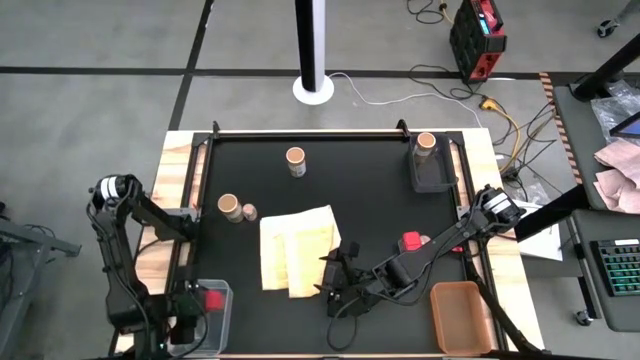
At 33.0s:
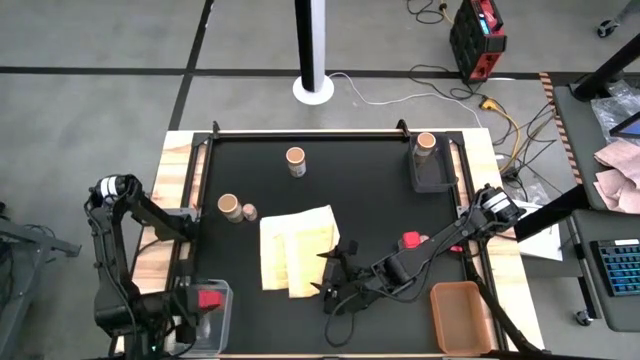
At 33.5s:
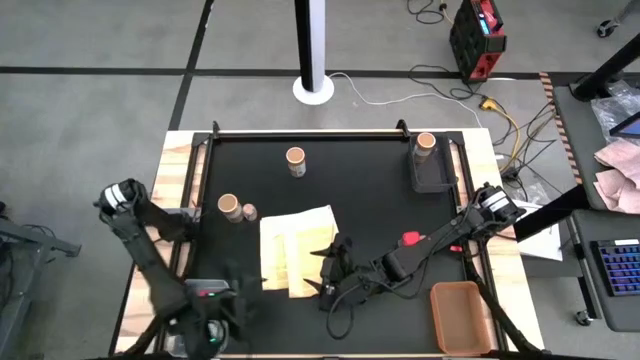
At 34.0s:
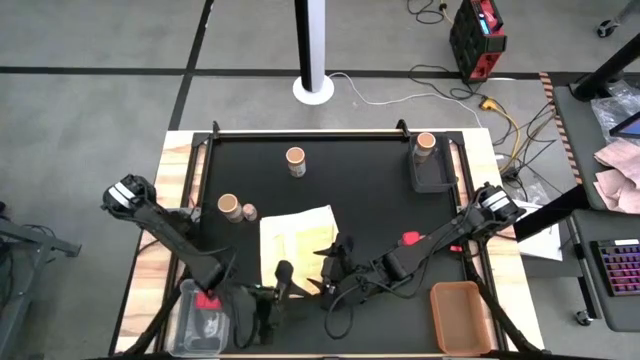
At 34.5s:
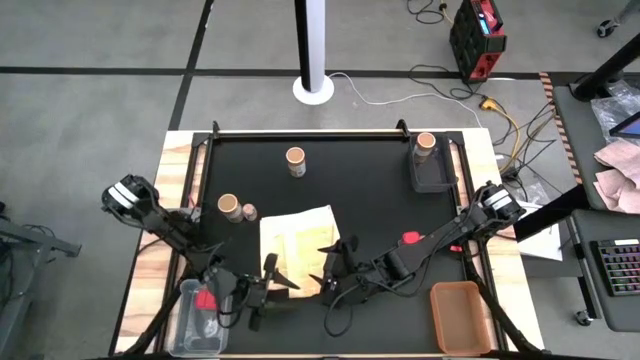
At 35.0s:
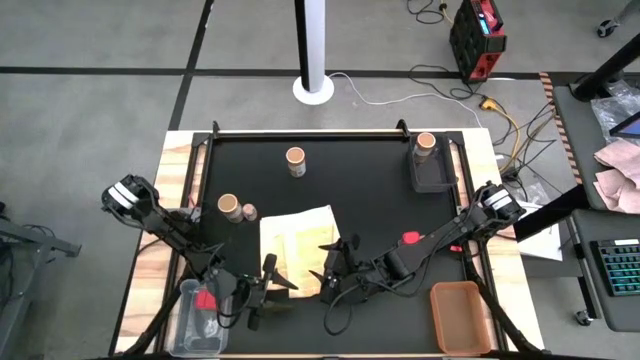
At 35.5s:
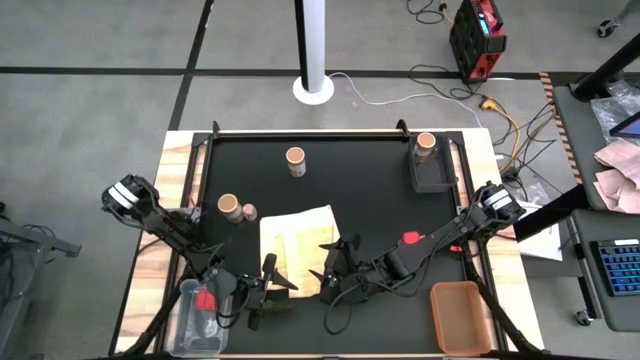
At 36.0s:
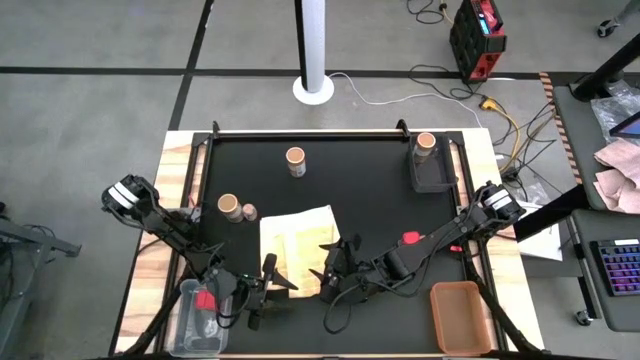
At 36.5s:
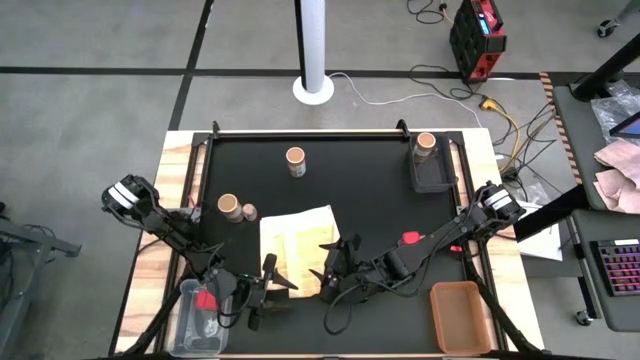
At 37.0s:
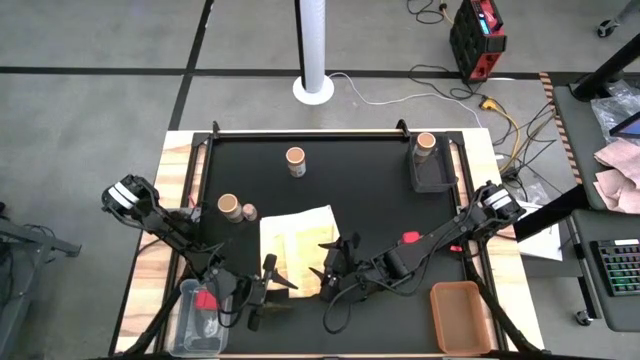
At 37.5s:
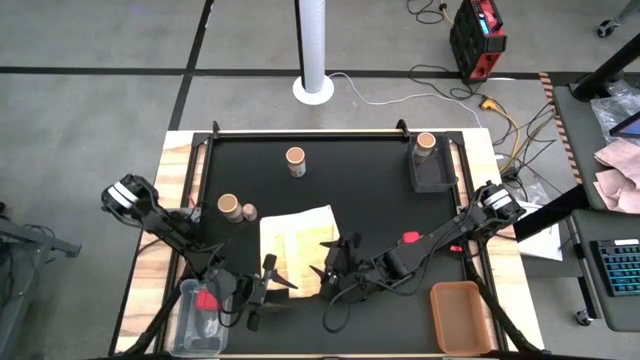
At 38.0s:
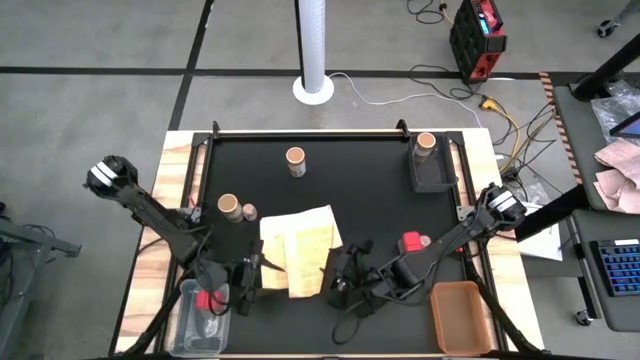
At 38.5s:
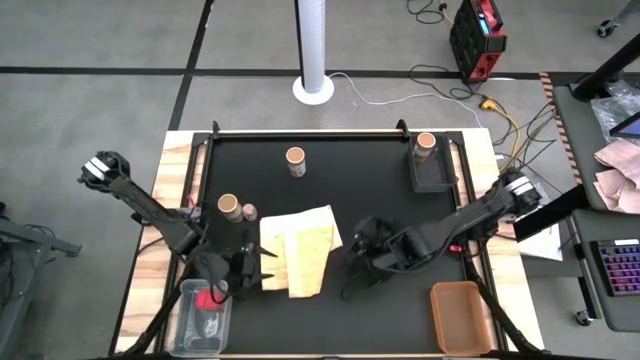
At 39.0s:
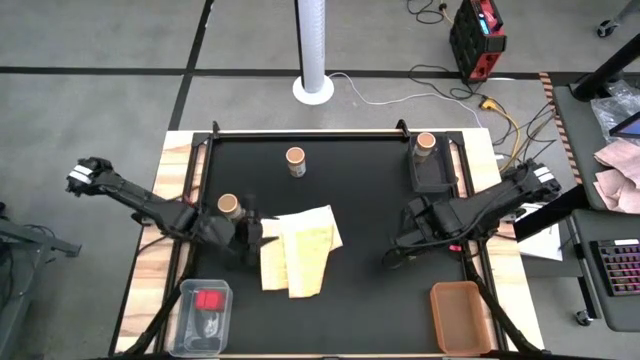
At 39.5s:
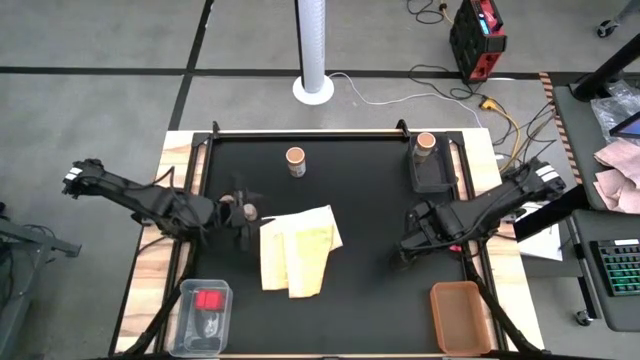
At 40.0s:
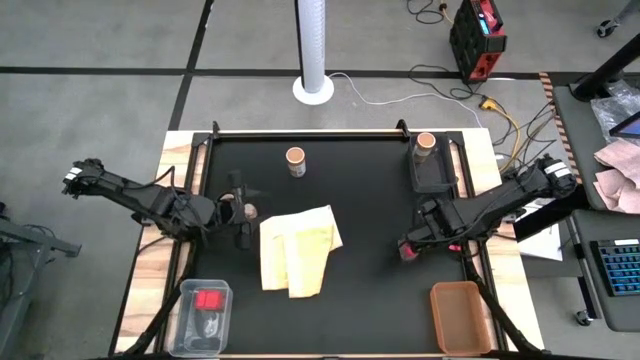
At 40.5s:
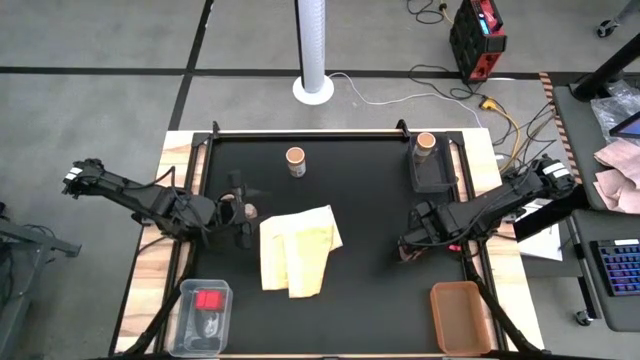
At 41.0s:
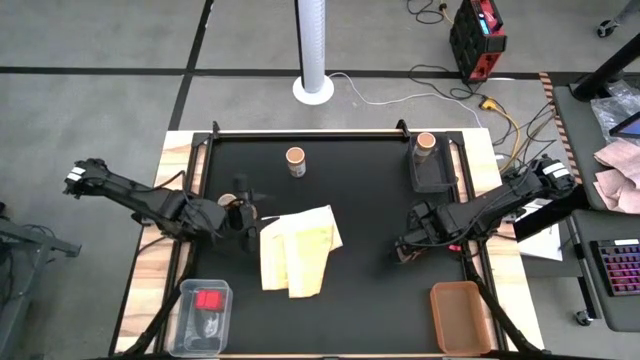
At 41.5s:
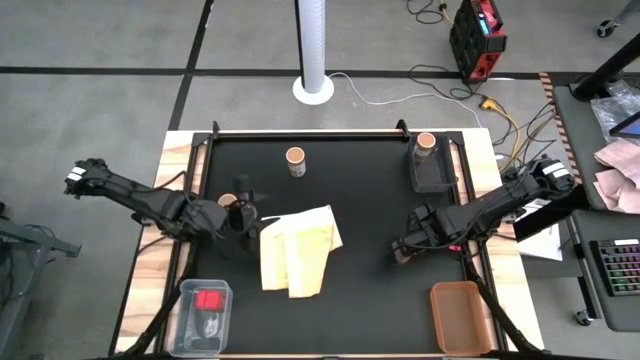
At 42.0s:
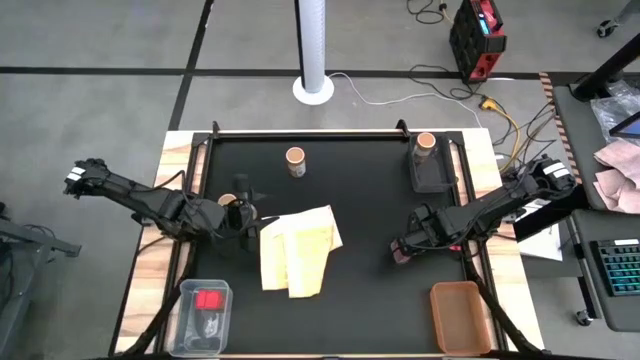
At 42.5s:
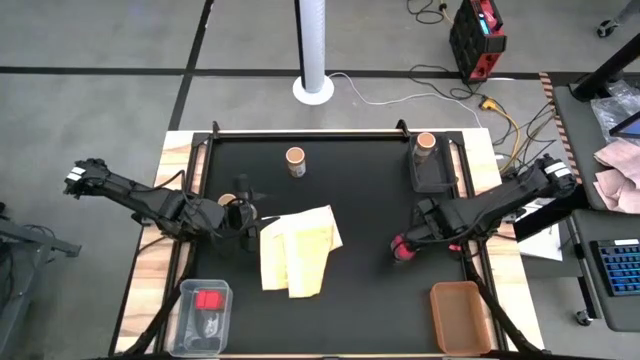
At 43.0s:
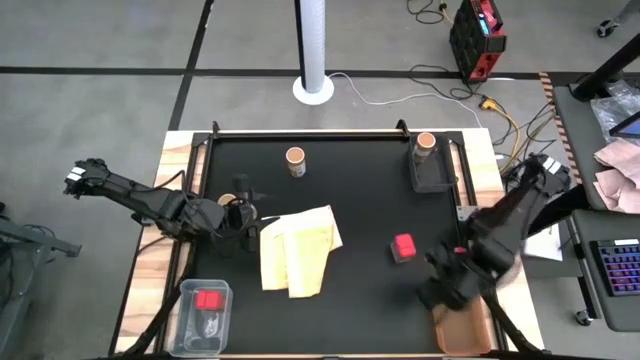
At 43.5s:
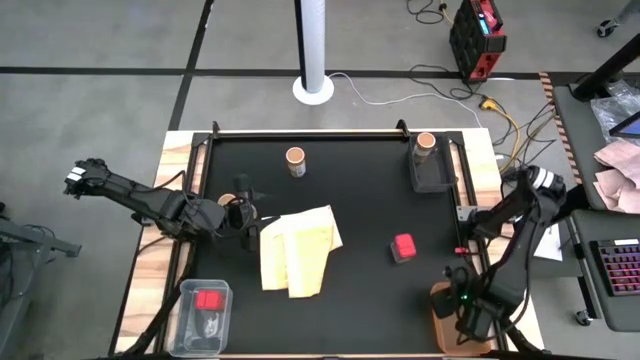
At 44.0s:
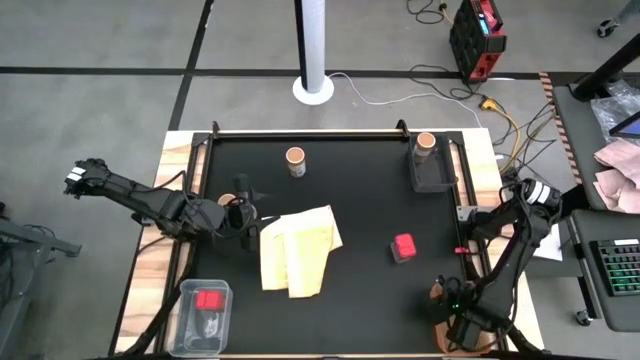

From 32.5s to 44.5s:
Task: Sort spices by type
Put the right brown spice bottle into the orange bin

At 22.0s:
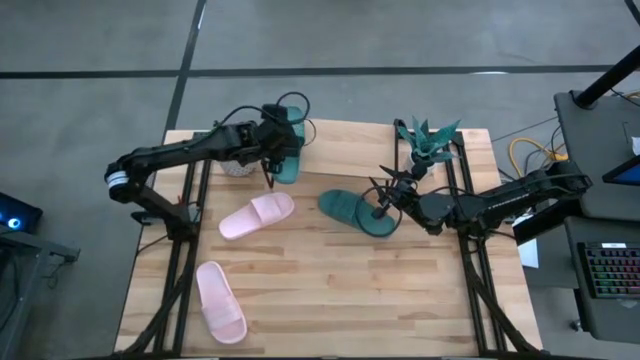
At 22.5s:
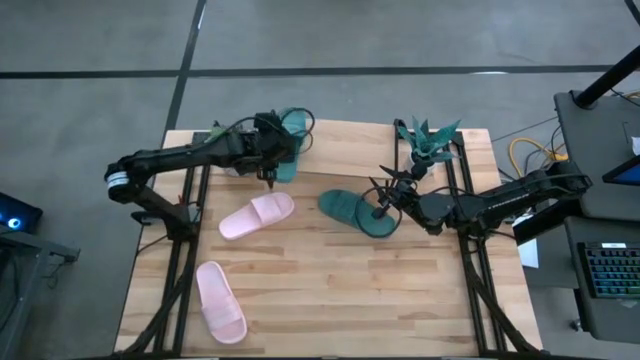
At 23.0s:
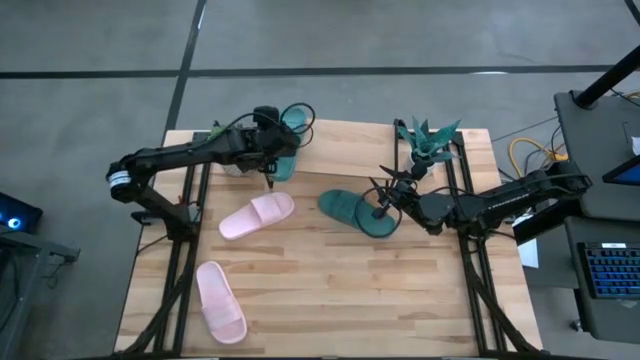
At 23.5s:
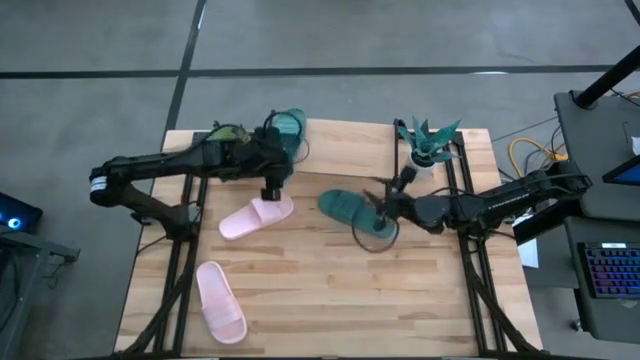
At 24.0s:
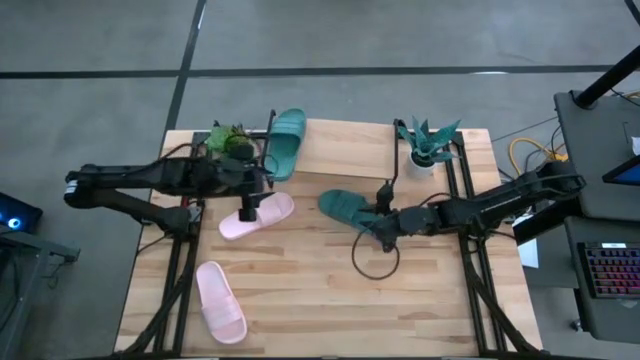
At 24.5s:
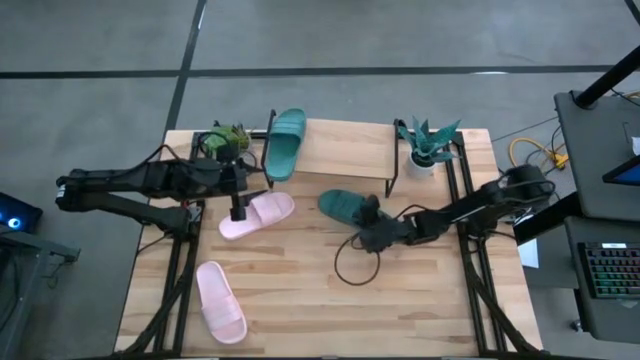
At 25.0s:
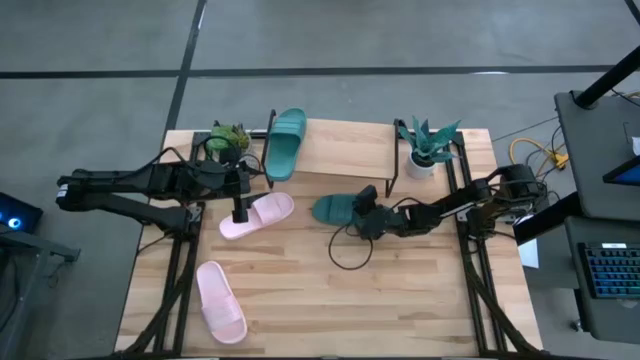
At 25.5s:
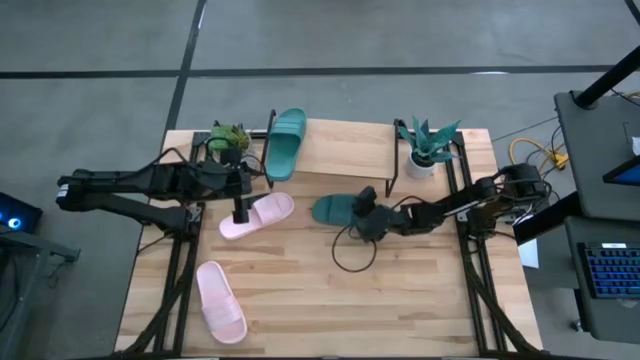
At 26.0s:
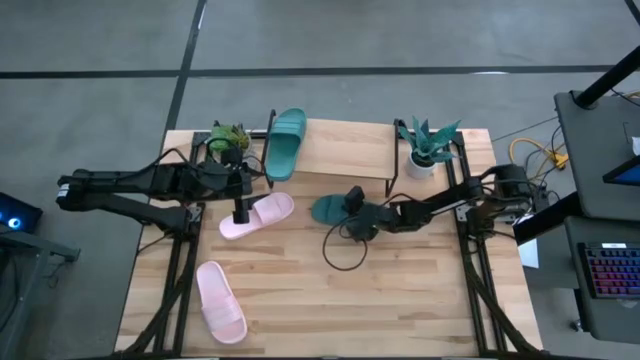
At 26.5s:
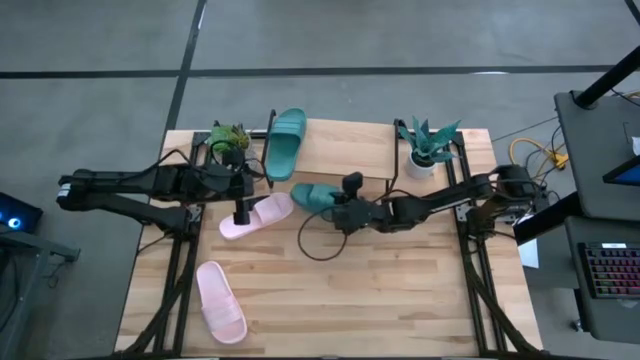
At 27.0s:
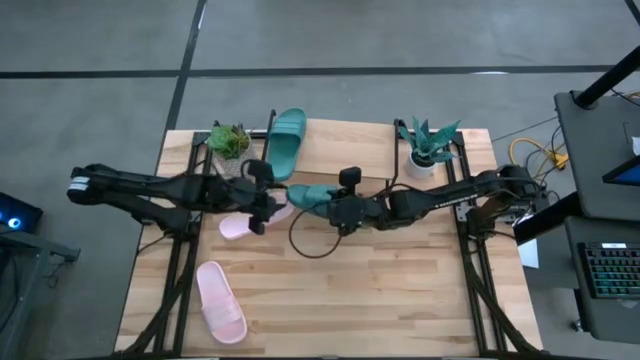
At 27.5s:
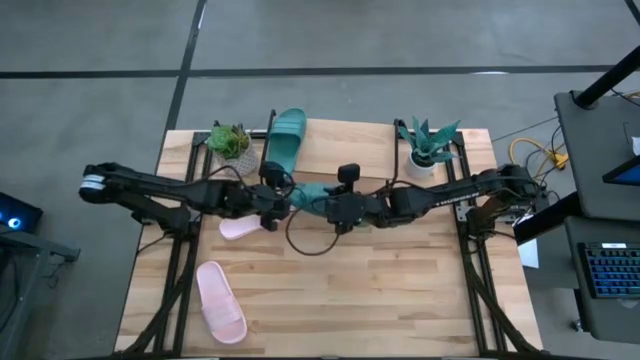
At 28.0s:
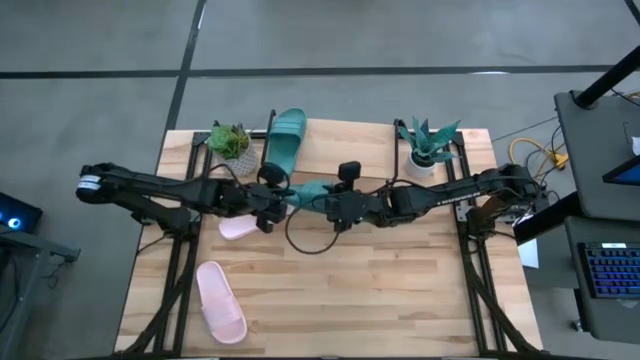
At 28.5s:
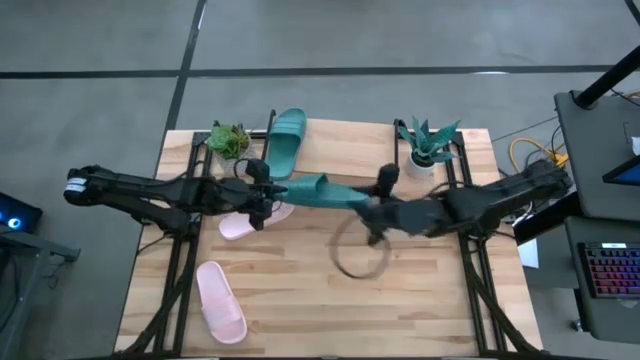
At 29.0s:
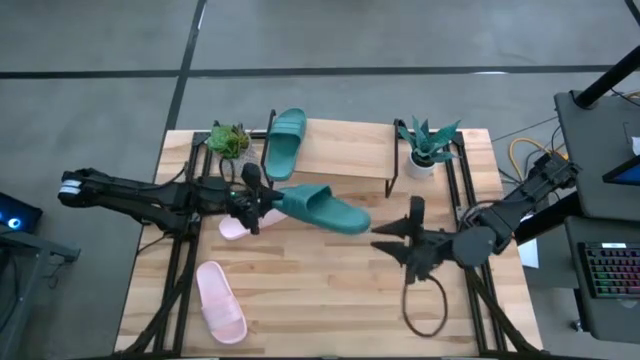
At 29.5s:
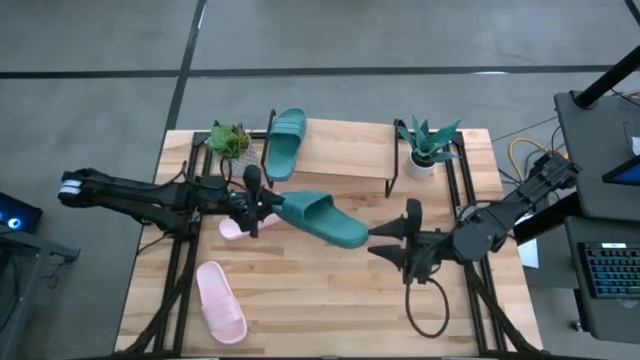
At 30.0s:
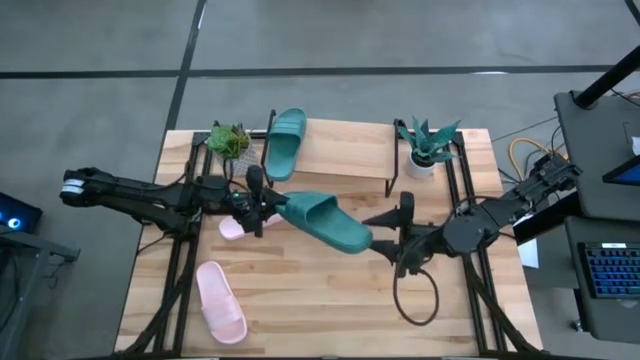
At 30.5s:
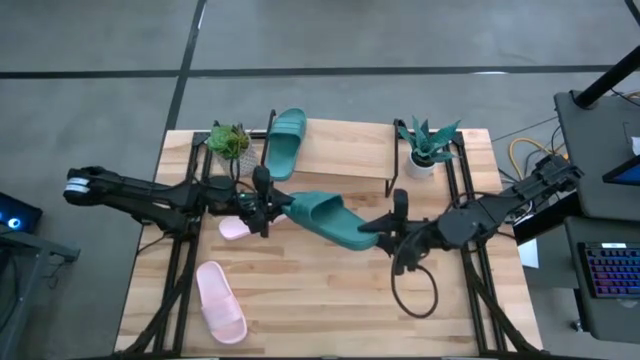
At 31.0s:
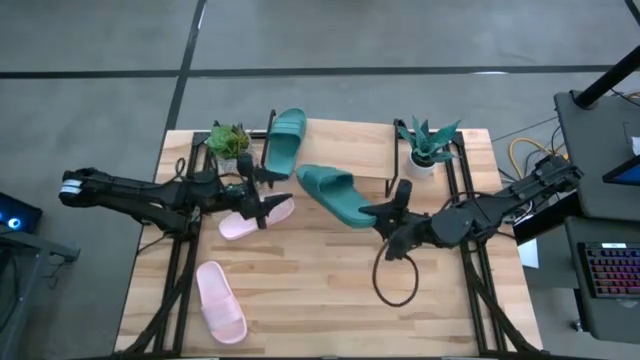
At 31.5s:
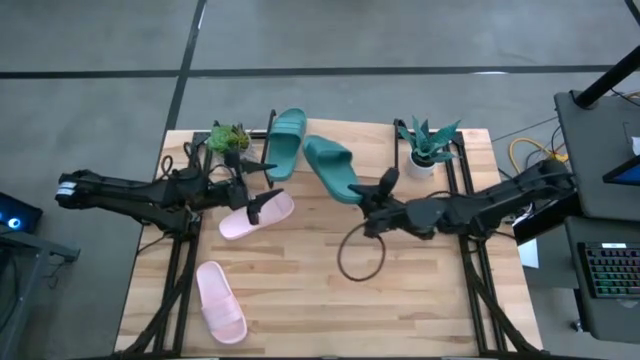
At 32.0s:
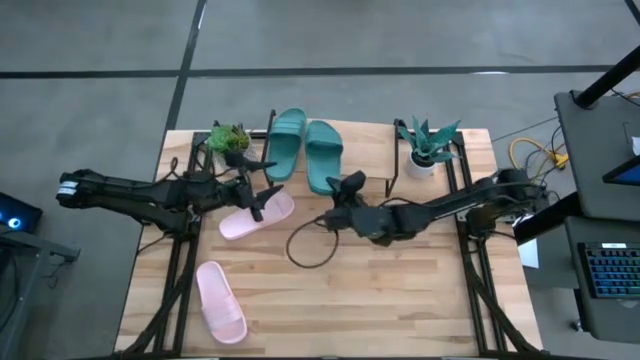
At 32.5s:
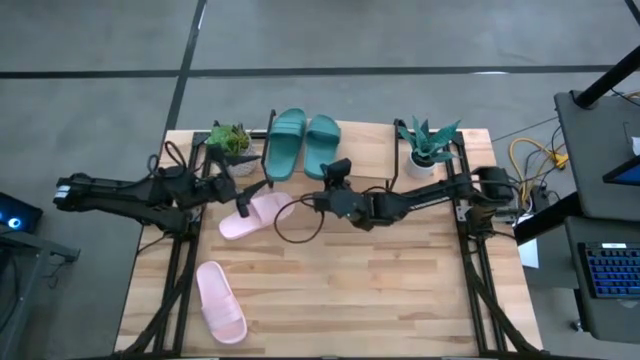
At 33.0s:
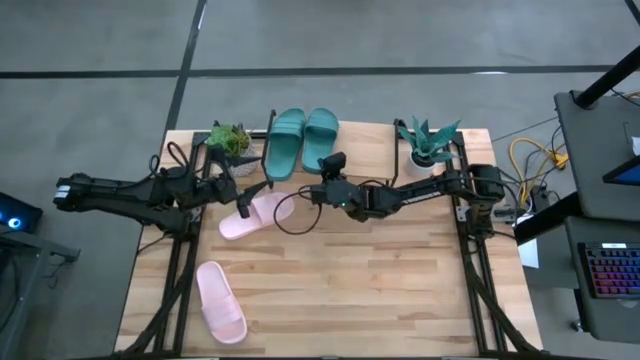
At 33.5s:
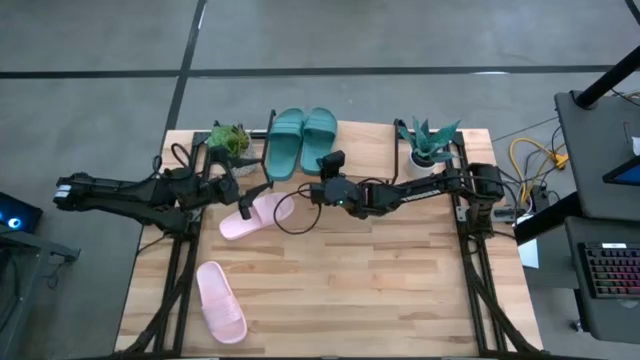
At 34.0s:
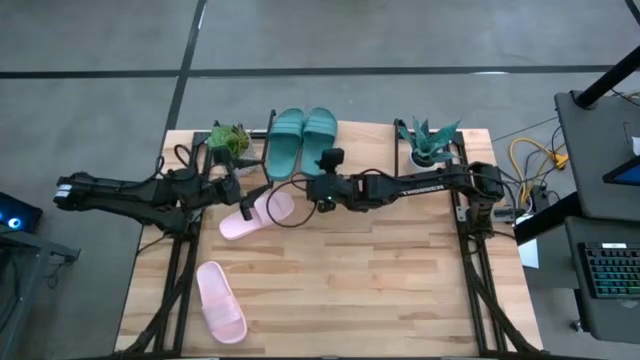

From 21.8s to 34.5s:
Task: Pick and place slides into the shelf
Put the green slide on the shelf
